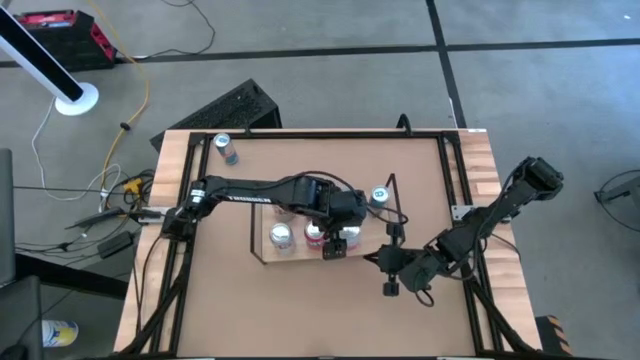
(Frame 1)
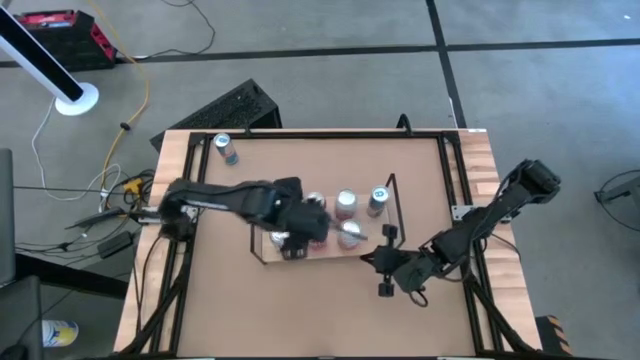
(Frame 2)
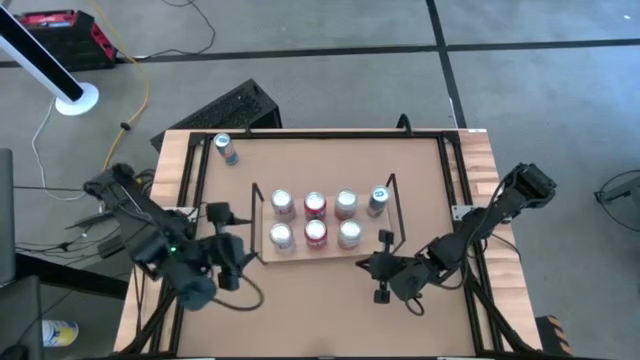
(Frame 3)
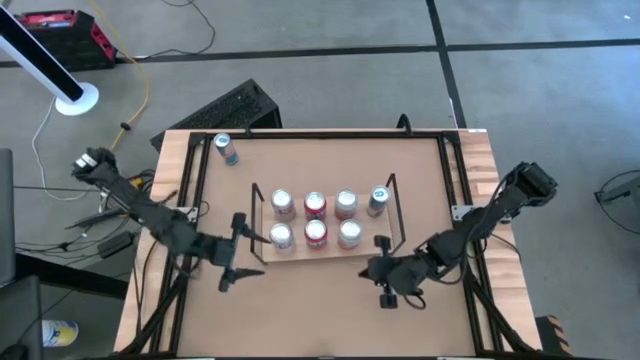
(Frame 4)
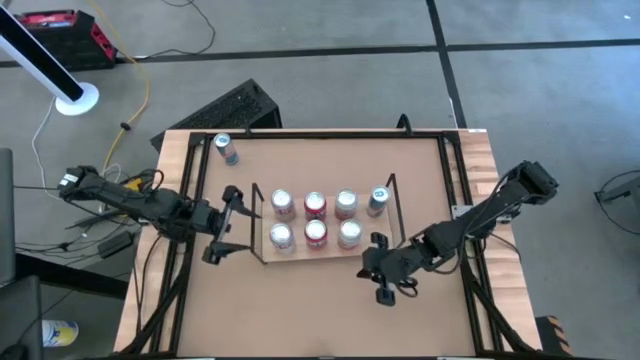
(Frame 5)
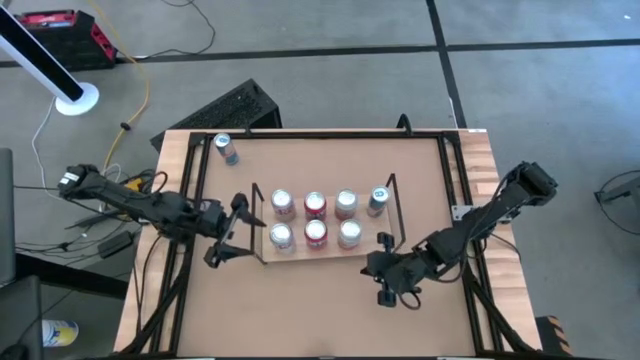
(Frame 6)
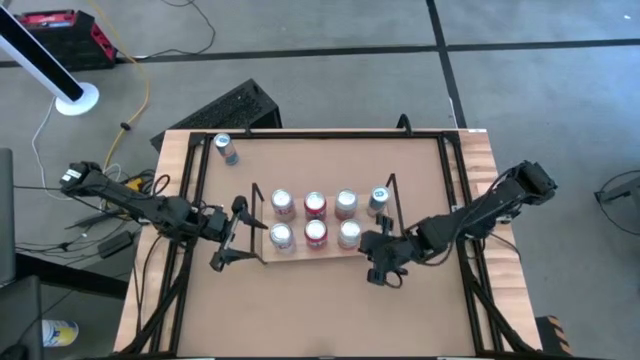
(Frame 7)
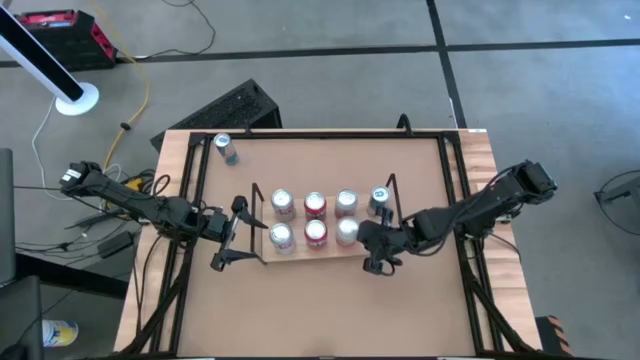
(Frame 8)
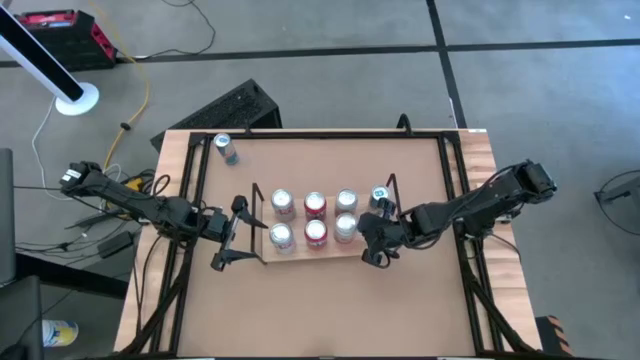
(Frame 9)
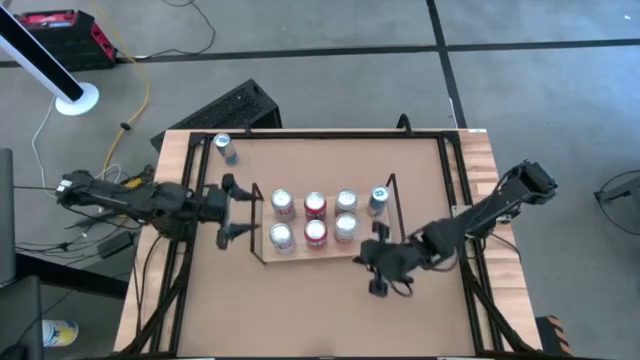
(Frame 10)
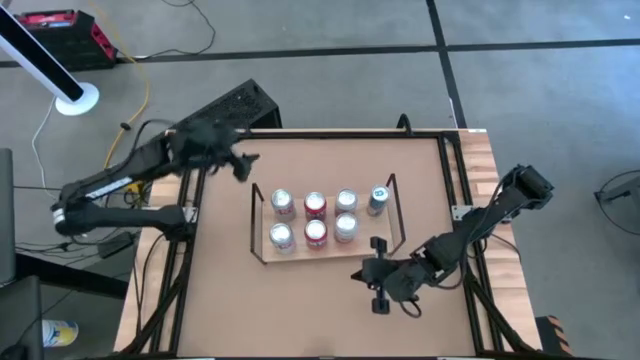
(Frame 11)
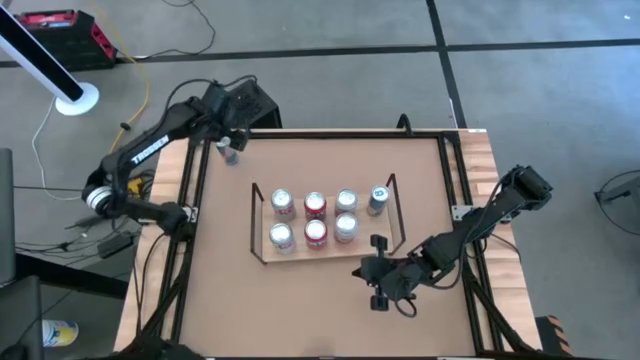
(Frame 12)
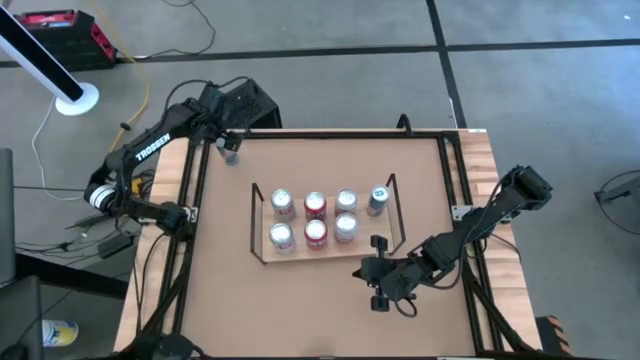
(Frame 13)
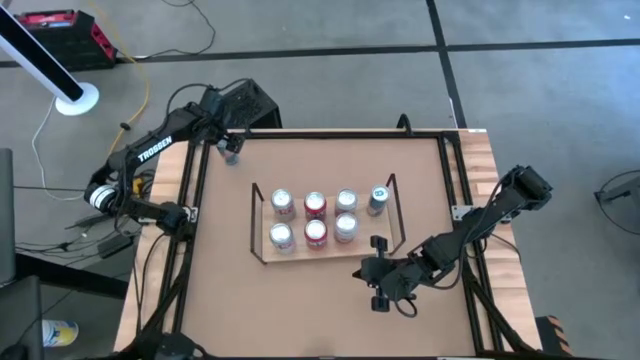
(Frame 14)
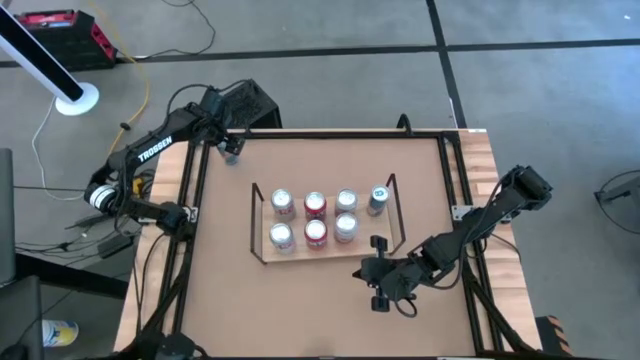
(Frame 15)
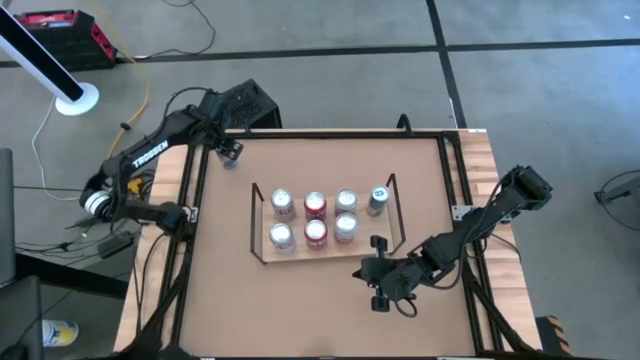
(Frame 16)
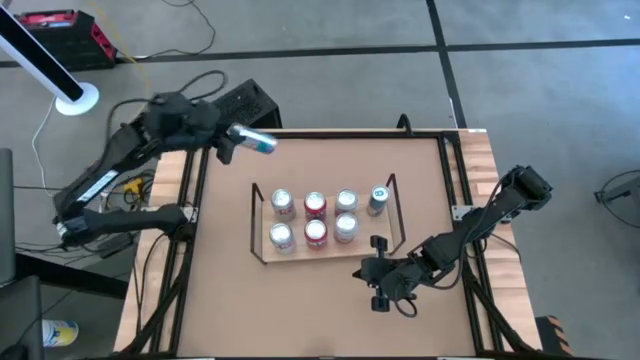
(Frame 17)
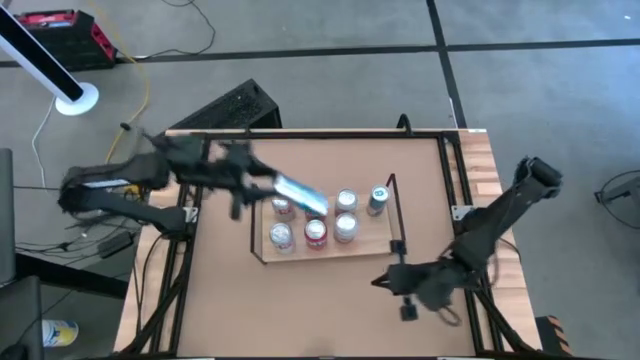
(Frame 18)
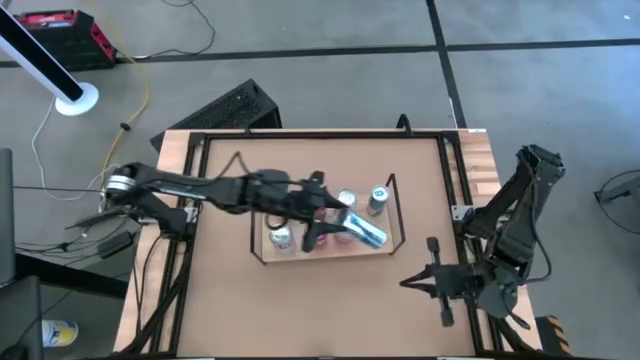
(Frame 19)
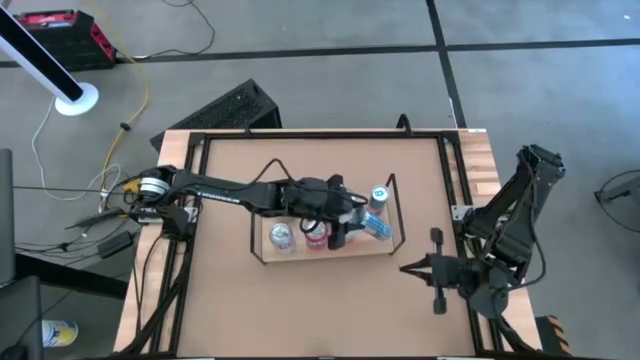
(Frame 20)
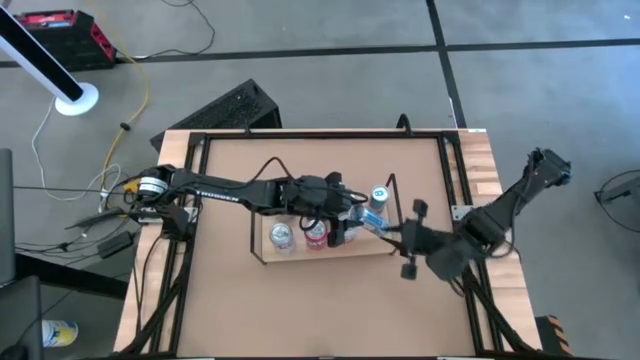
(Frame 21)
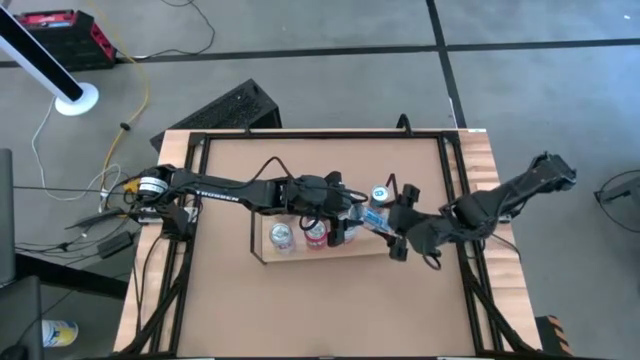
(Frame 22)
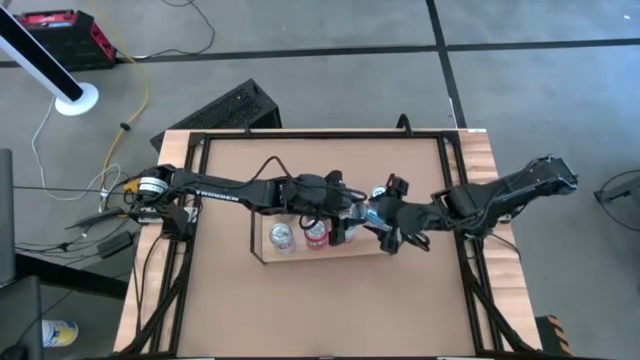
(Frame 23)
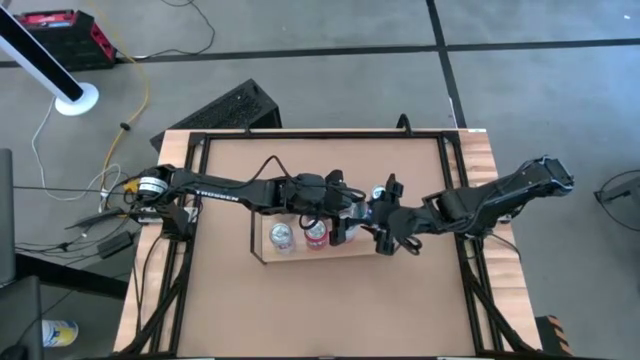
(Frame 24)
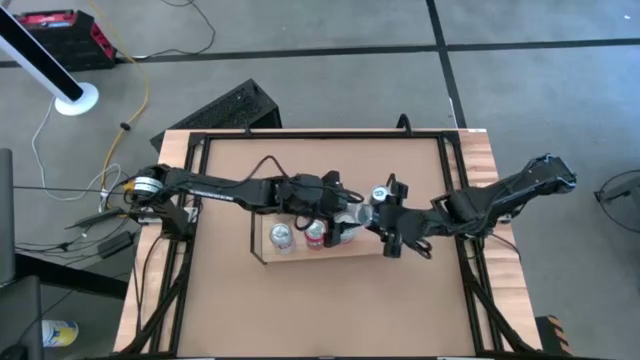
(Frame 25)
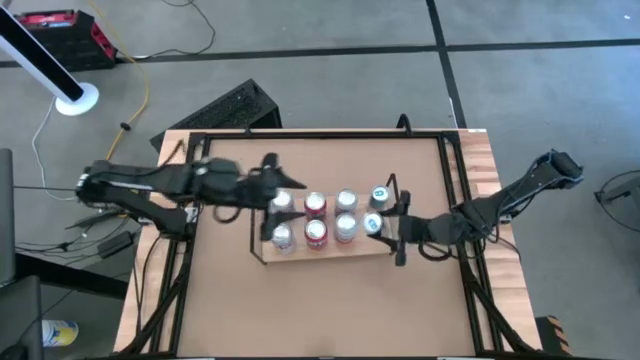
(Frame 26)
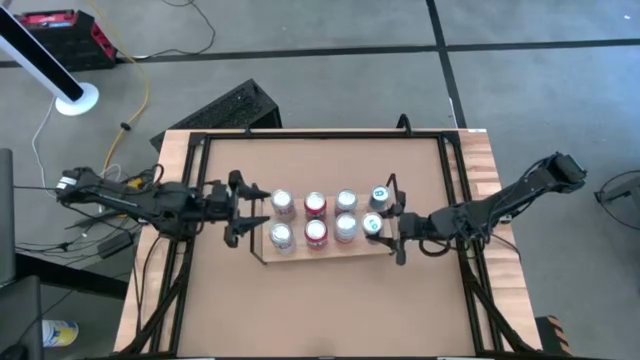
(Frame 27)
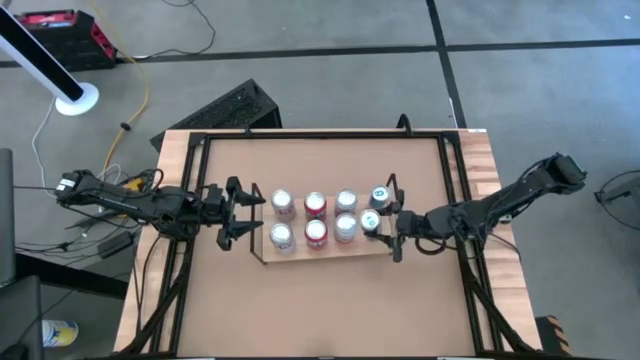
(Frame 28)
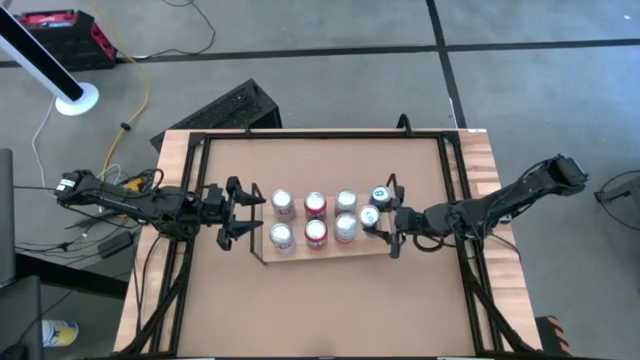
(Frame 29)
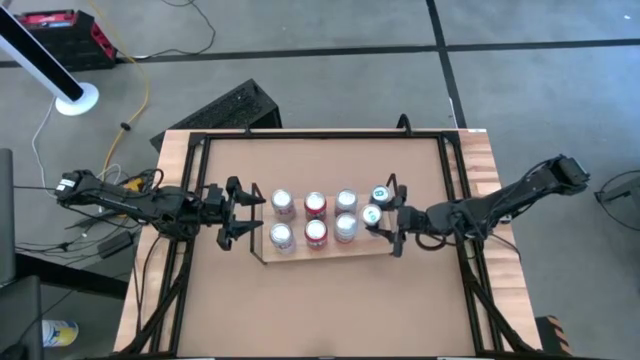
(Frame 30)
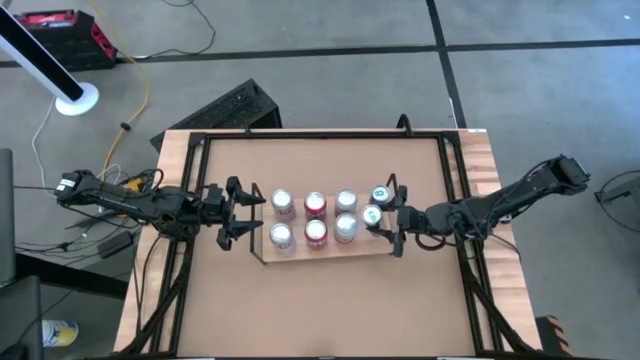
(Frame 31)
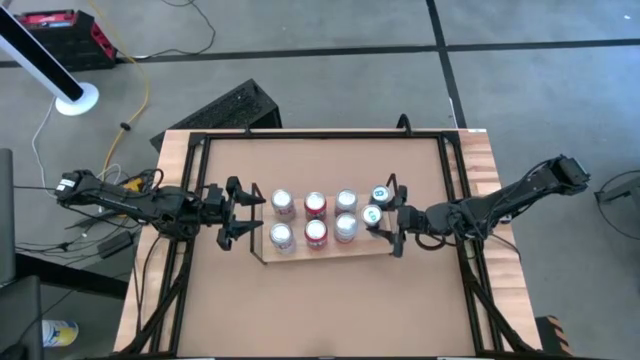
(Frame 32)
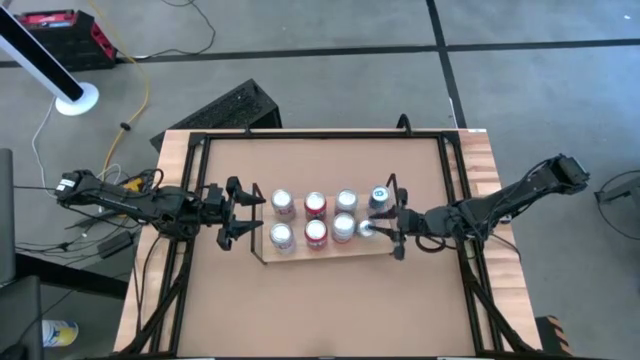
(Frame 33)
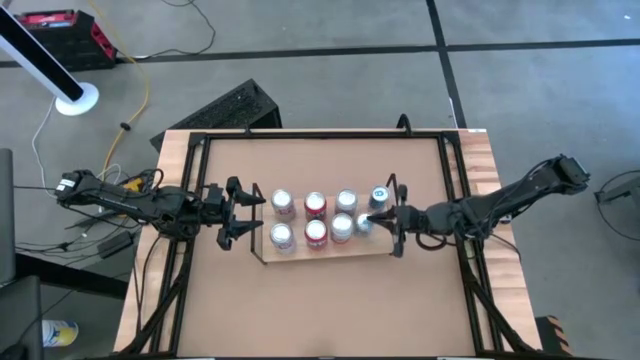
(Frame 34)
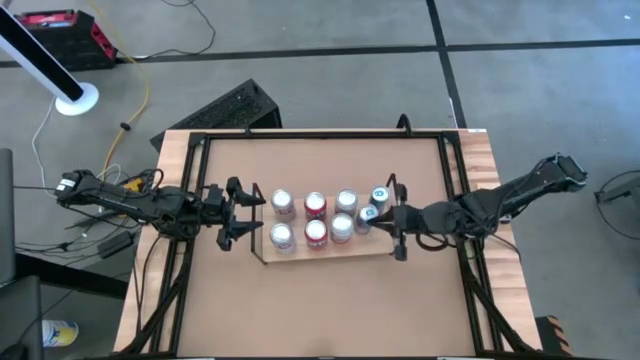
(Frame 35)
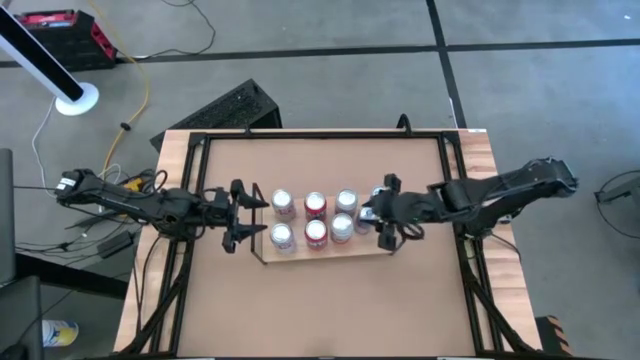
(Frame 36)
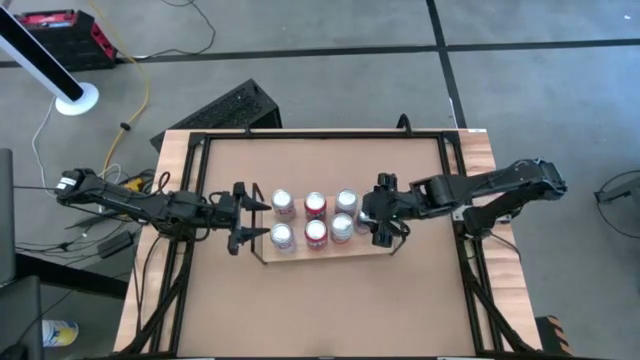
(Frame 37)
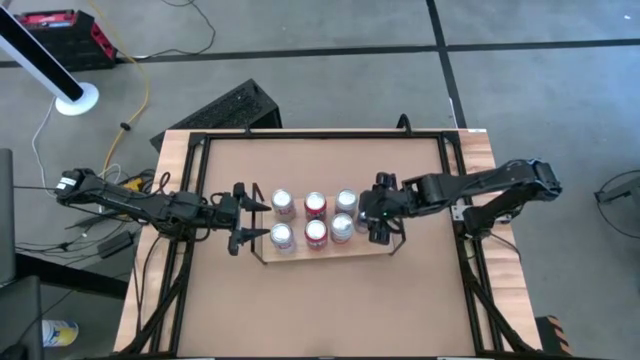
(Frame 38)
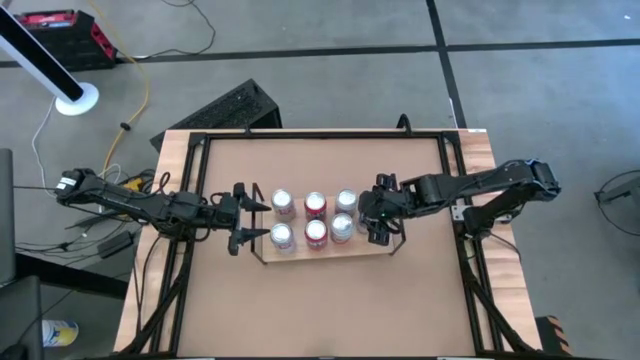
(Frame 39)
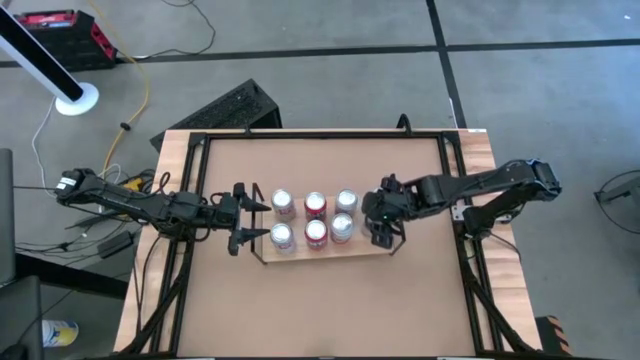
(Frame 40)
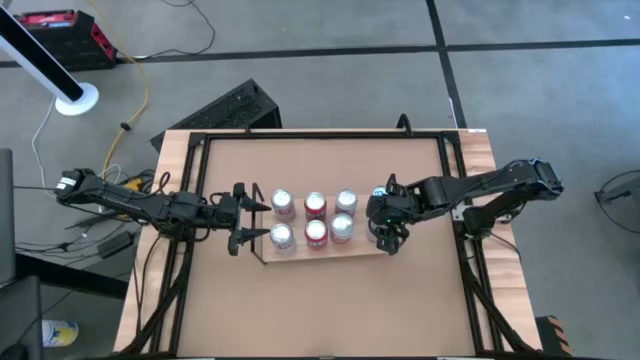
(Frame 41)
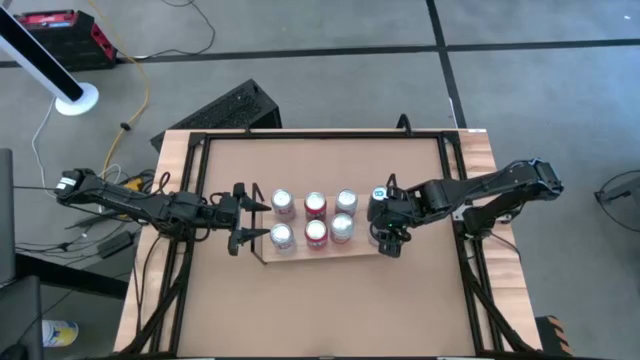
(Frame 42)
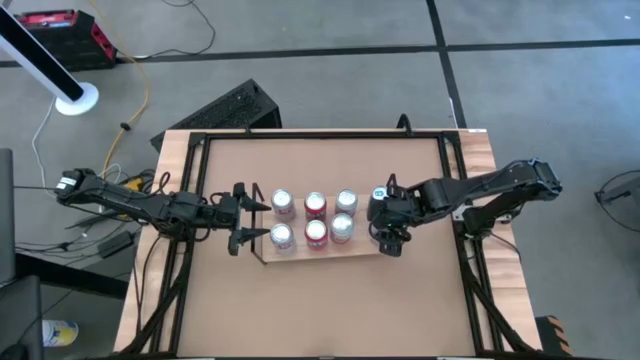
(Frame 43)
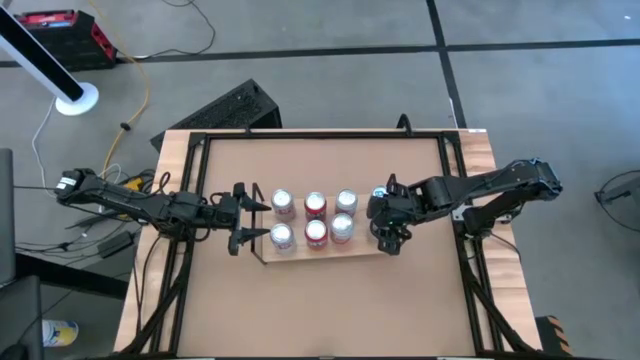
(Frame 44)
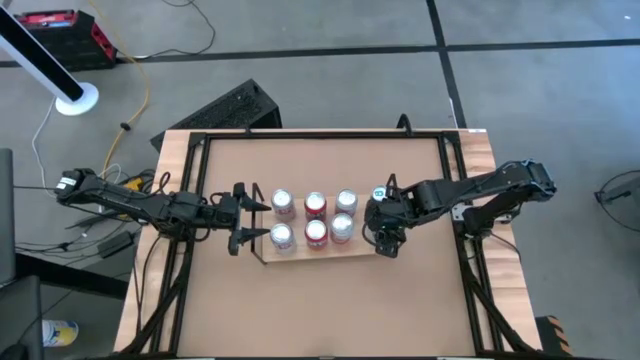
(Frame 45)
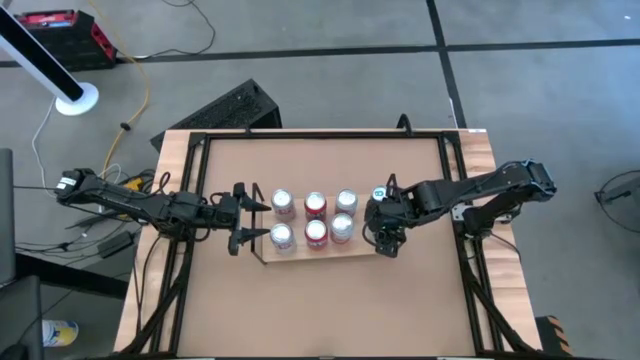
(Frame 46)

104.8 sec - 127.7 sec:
Task: Place canned beverage on shelf
Put the blue soda can on the shelf aligned with the other pink can
